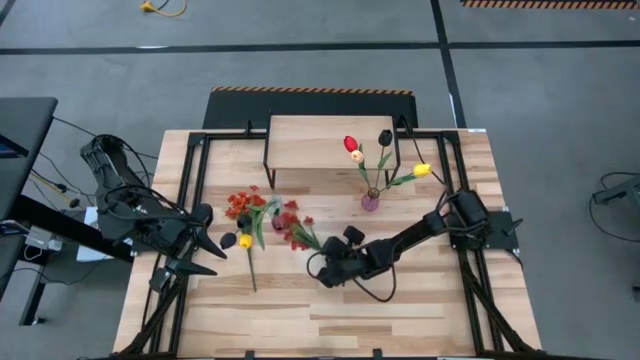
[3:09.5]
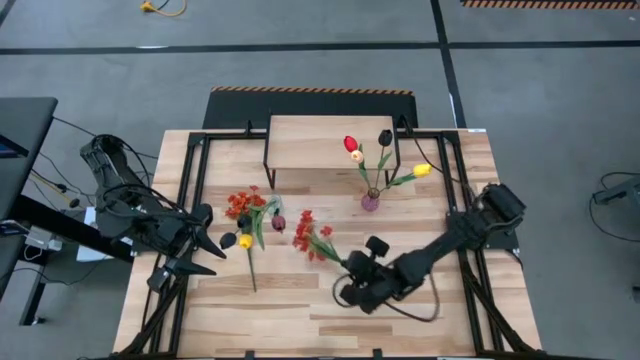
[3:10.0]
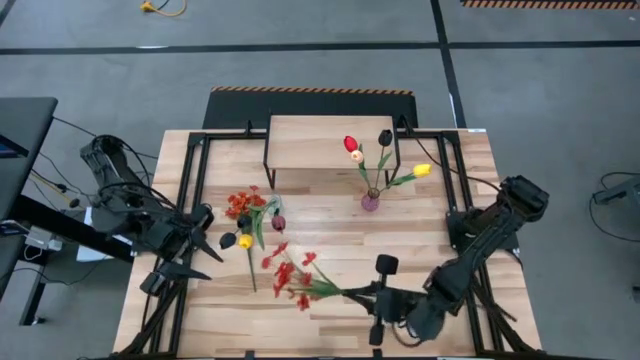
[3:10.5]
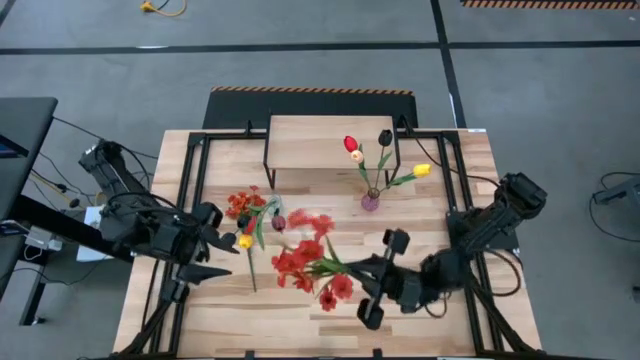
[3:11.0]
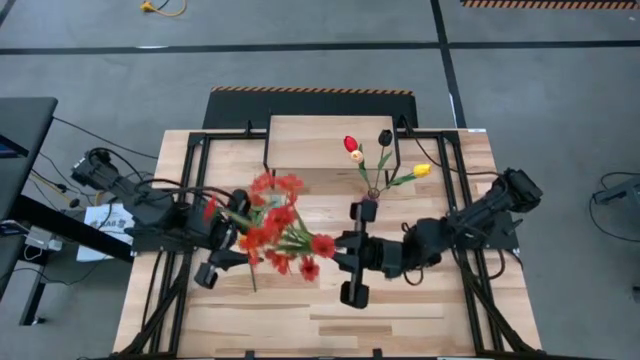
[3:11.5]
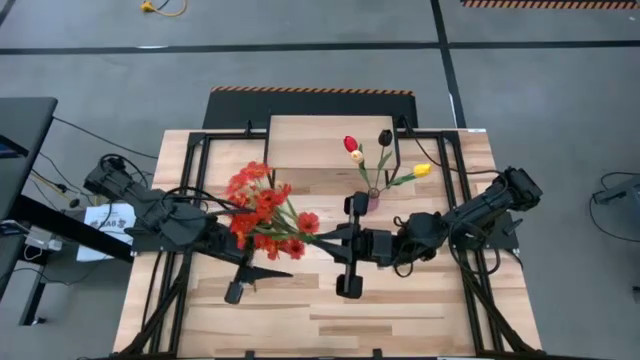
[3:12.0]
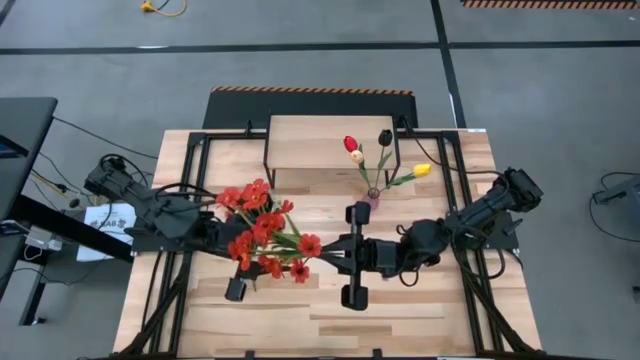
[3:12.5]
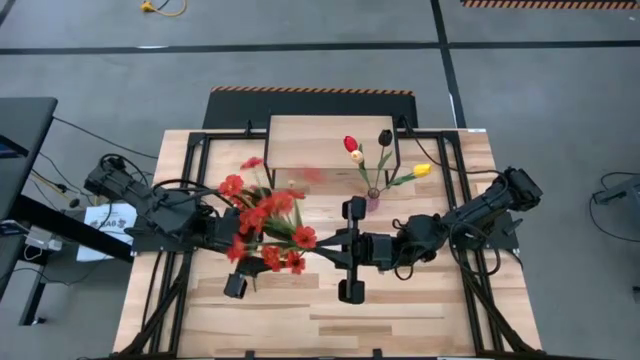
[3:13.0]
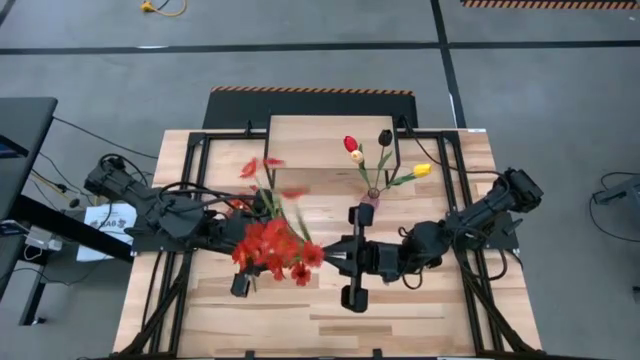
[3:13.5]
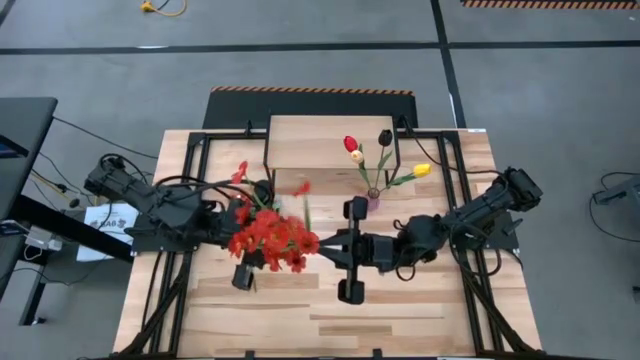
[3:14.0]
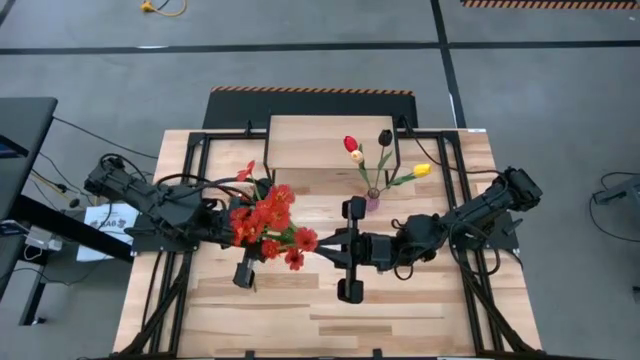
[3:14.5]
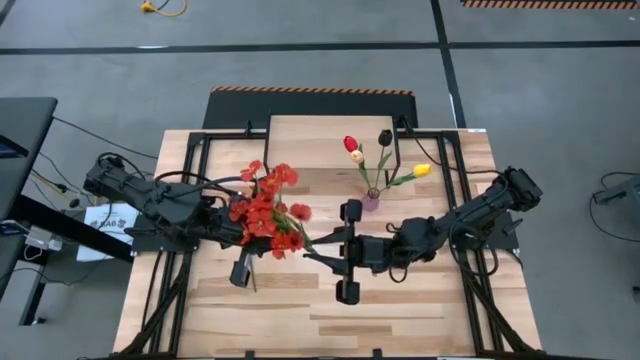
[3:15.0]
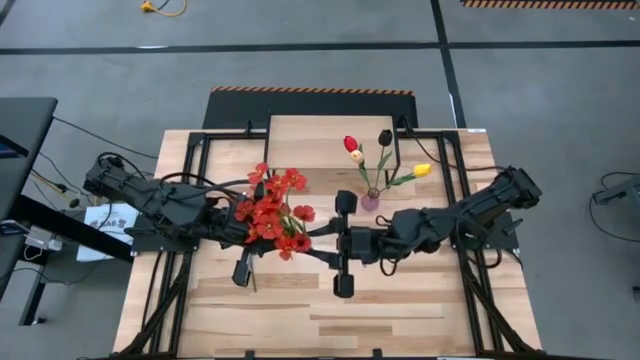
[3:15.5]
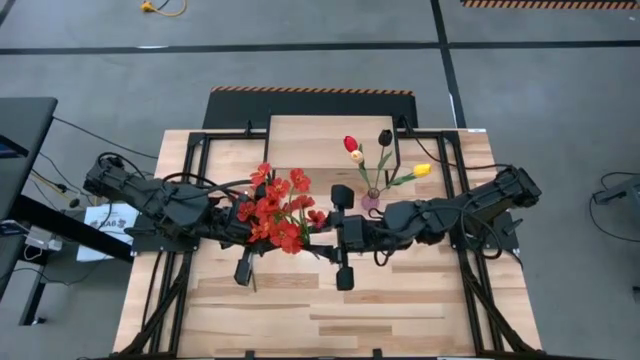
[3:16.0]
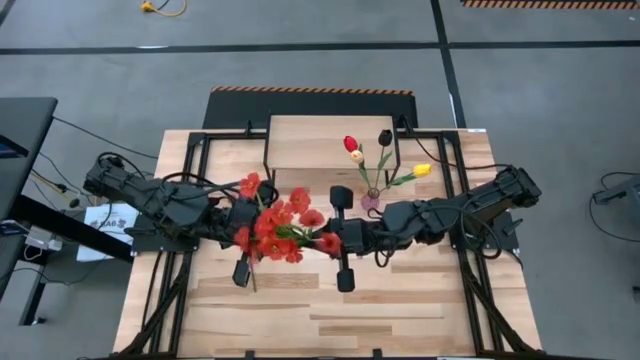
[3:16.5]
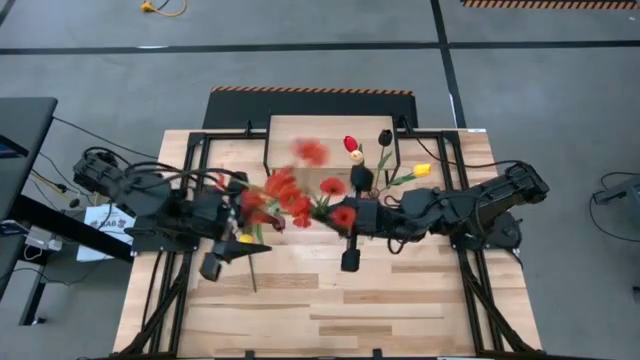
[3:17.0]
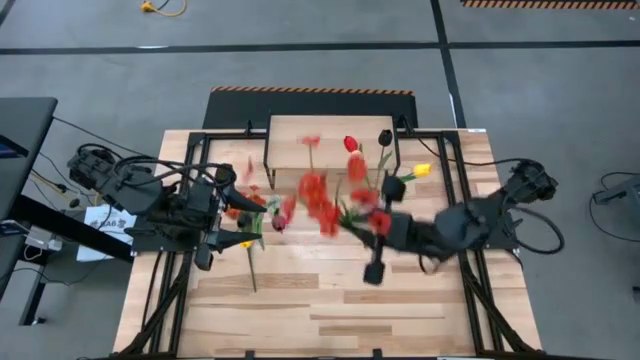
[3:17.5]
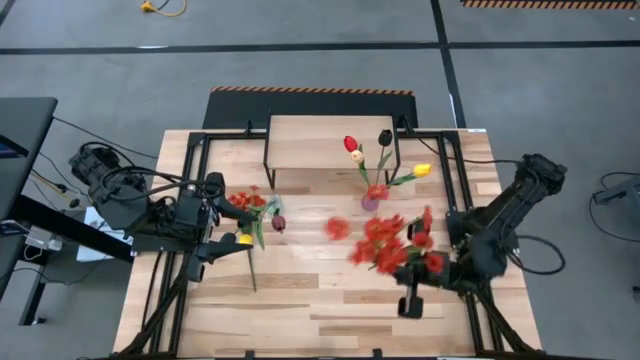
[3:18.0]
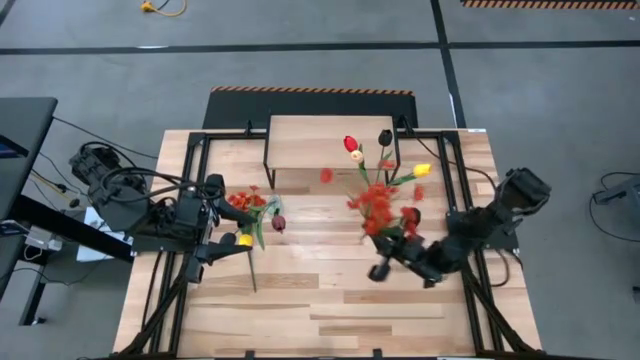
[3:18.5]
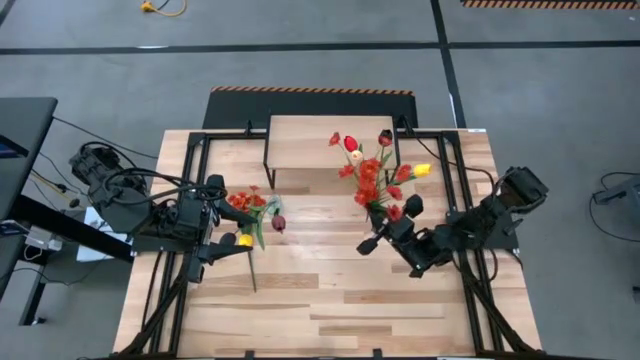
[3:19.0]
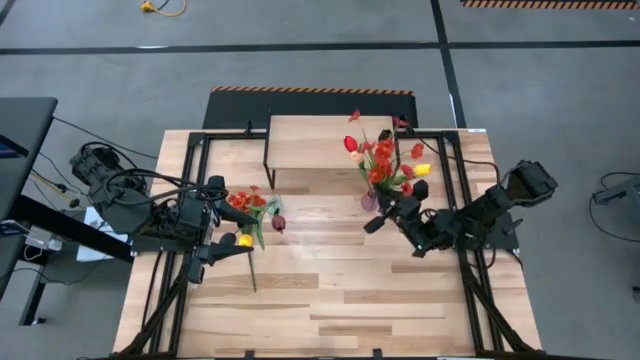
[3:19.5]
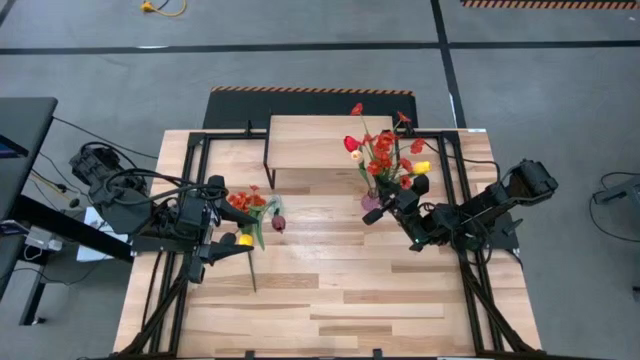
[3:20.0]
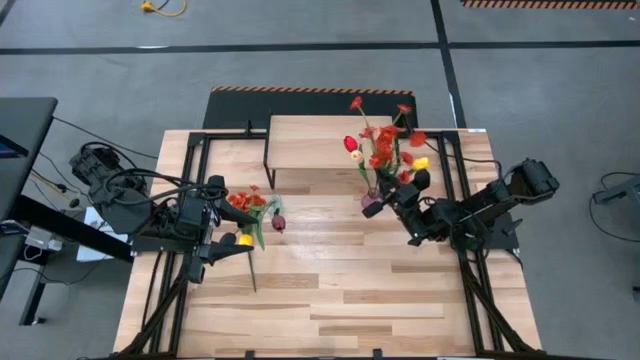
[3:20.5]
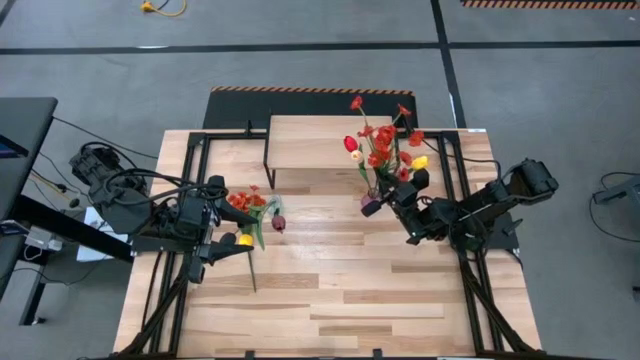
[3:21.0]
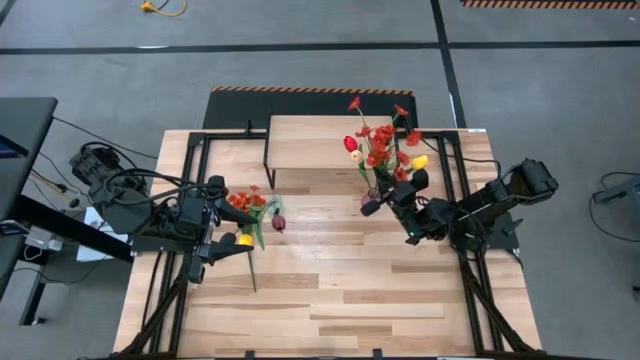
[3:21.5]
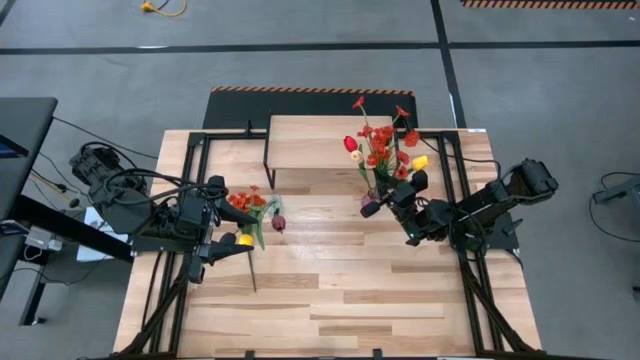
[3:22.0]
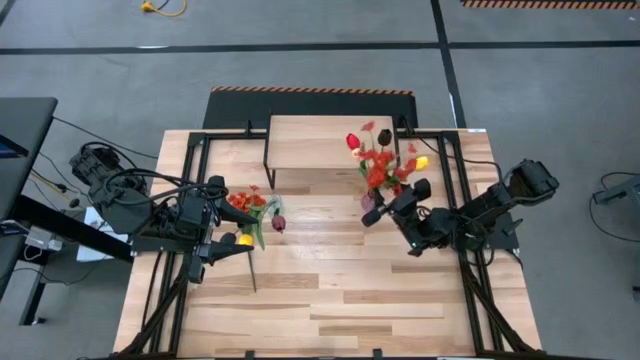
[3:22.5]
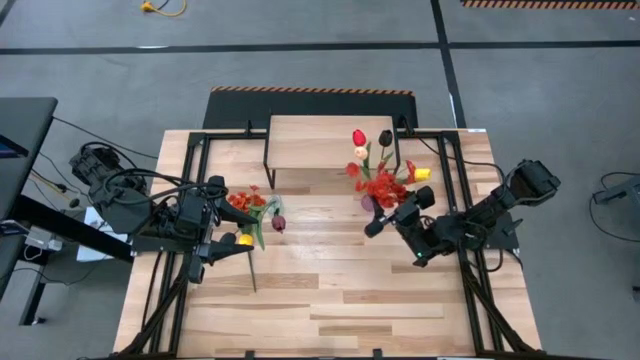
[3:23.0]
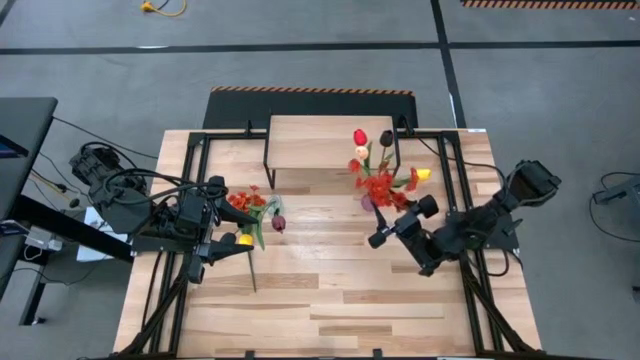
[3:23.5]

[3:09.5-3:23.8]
Task: Pick and place flowers into a vace then onto a shelf
Put the right red flower into the purple vase

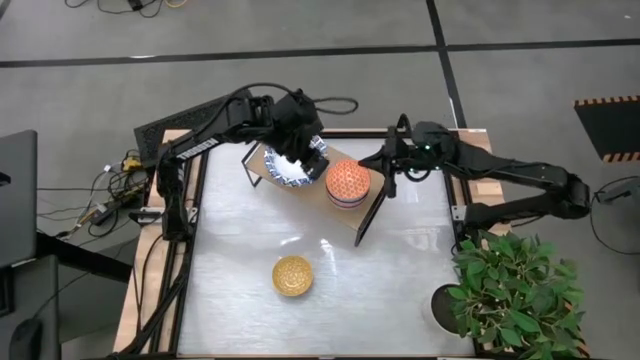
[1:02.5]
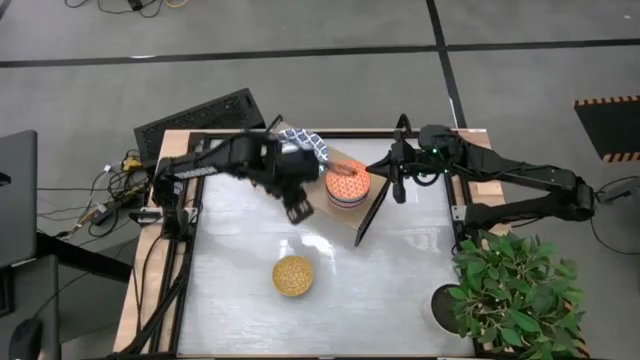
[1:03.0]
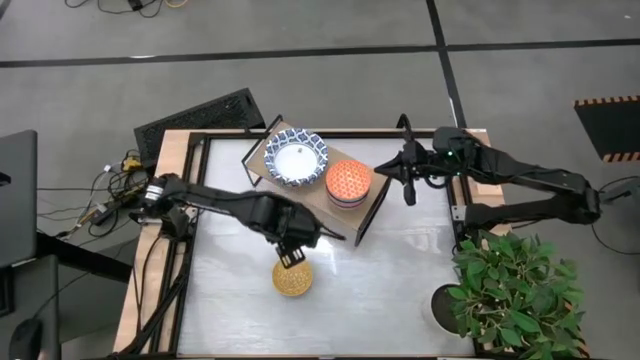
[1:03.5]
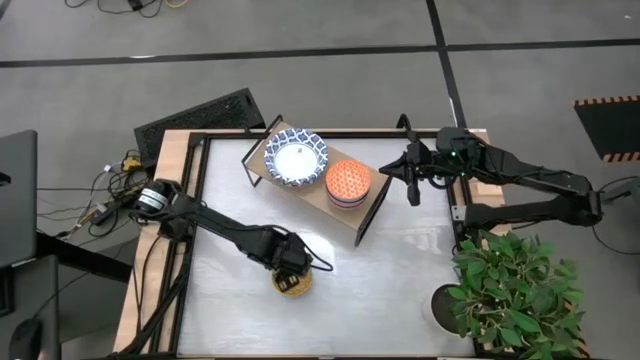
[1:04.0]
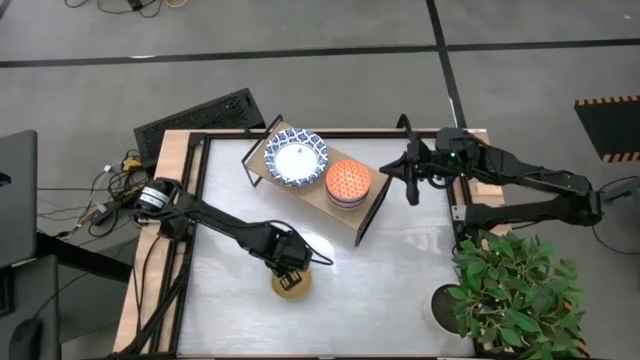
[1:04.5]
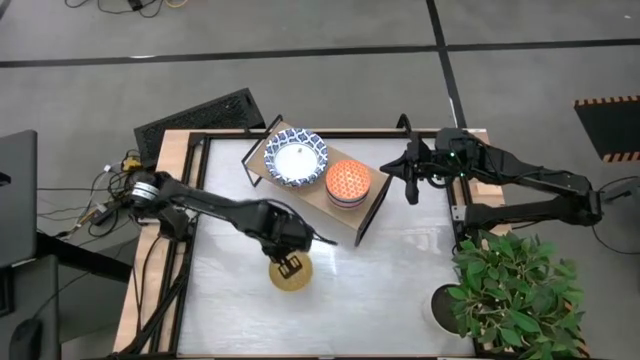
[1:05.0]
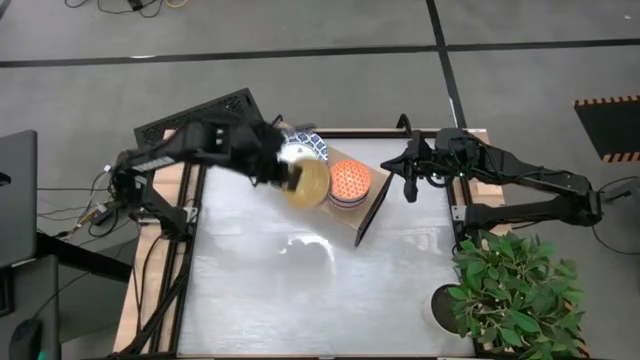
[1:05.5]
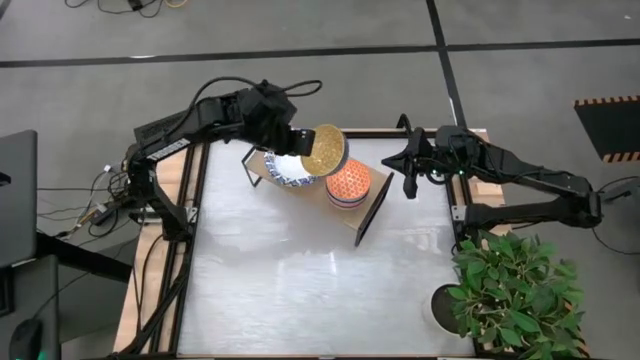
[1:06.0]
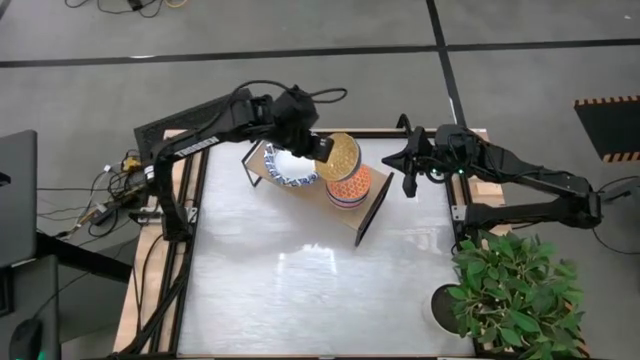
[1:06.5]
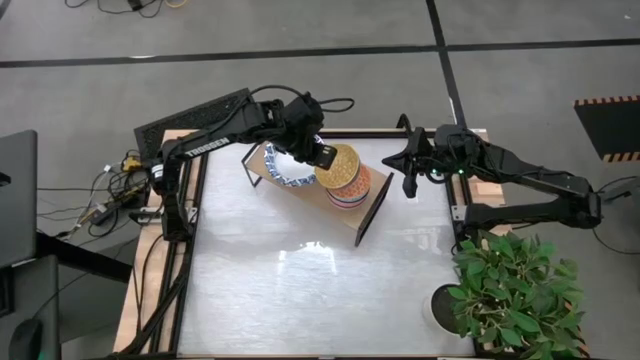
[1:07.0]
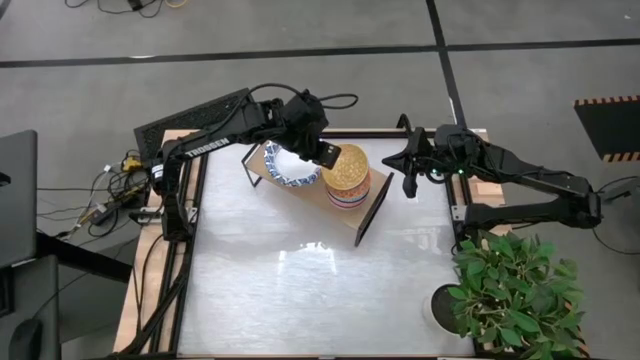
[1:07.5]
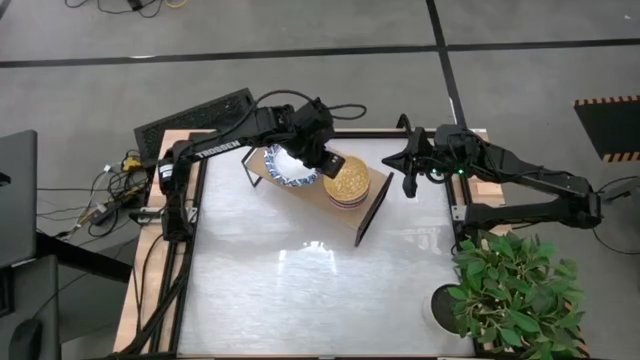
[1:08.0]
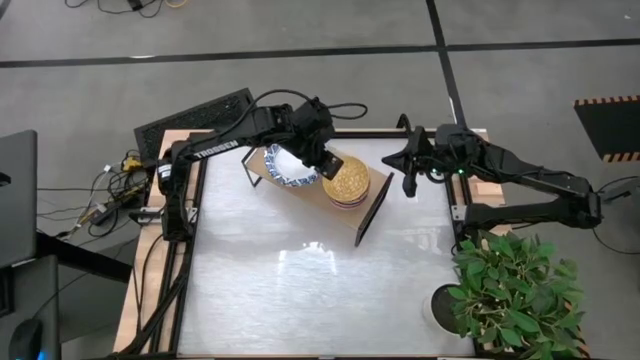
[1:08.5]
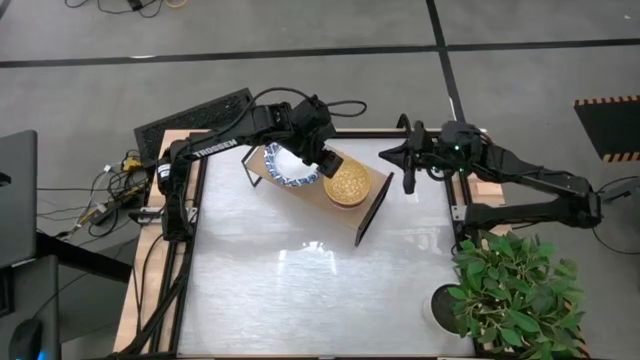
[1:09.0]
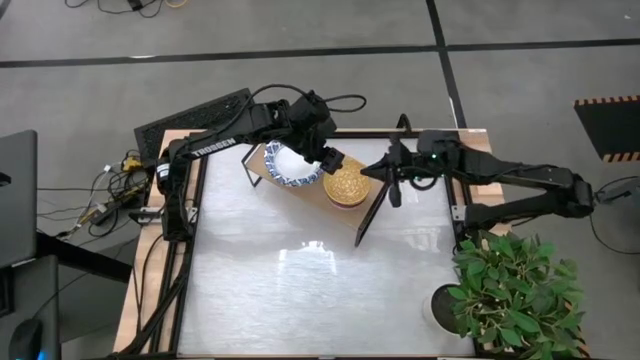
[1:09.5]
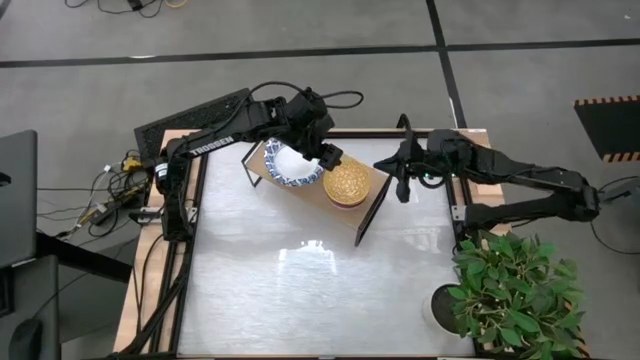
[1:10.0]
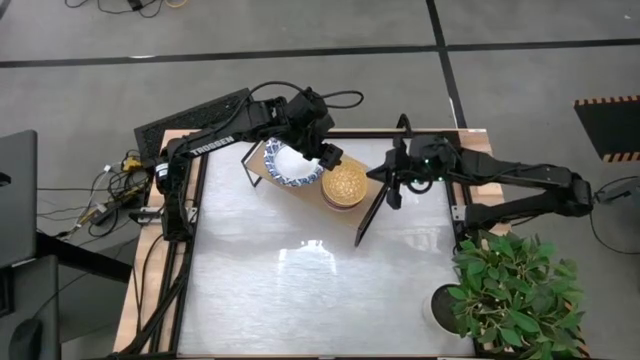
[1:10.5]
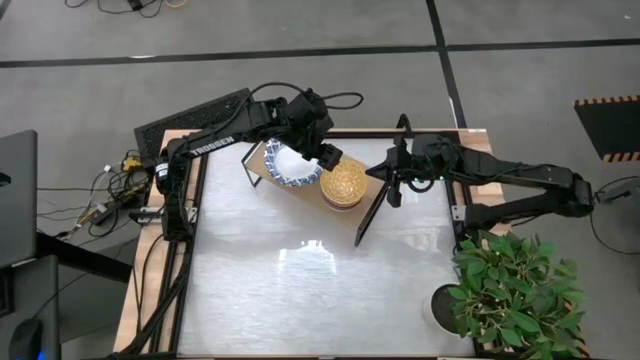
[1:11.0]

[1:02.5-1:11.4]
Task: Place and stack bowls onto a shelf
Stack the yellow bowl on top of the orange bowl on the shelf
